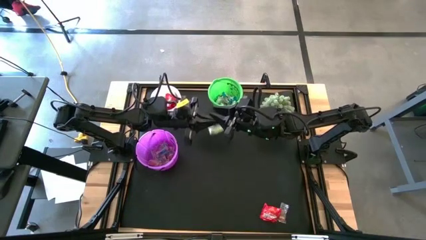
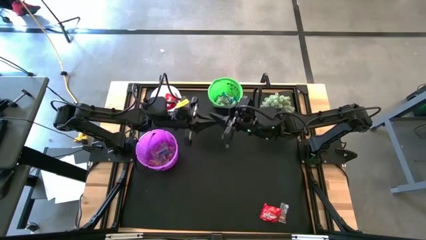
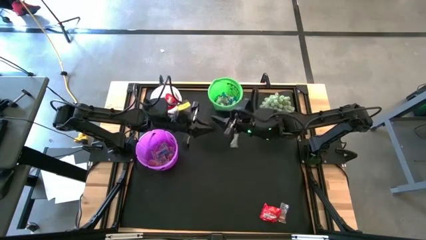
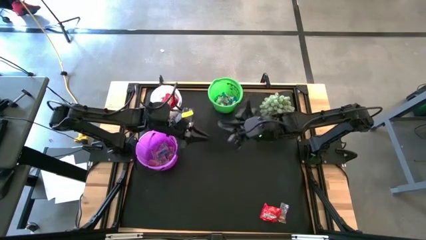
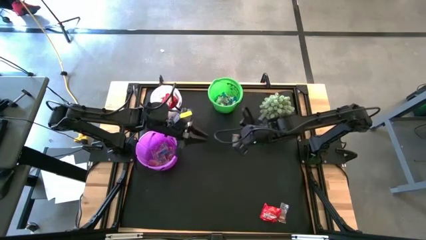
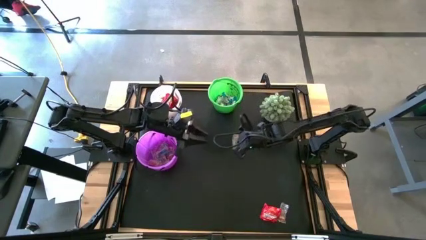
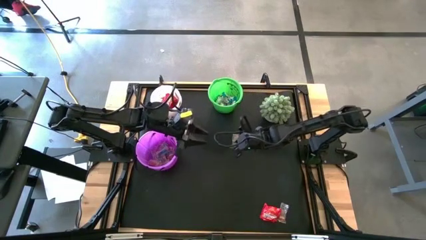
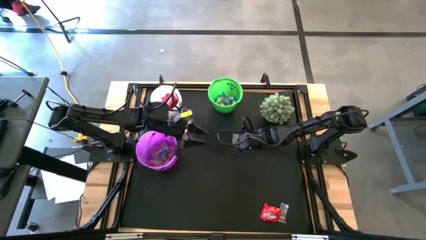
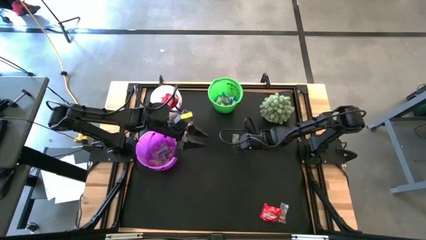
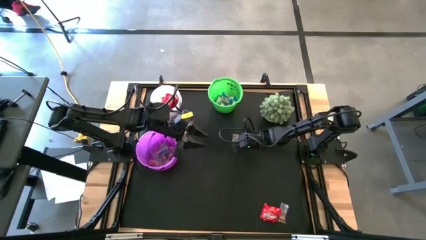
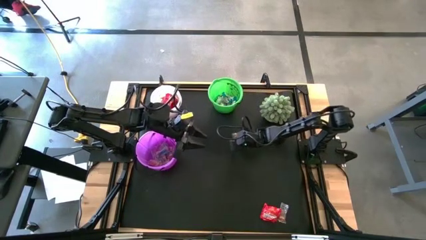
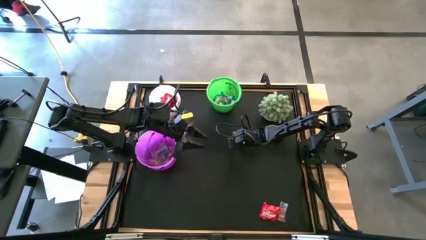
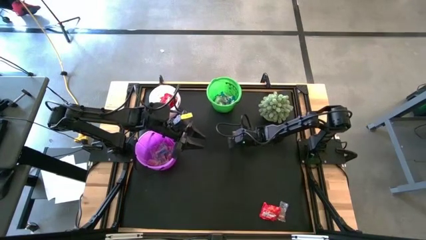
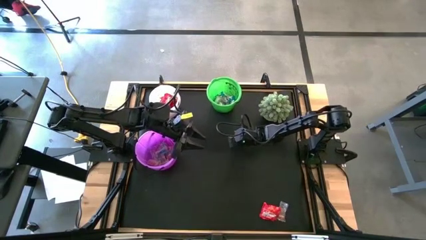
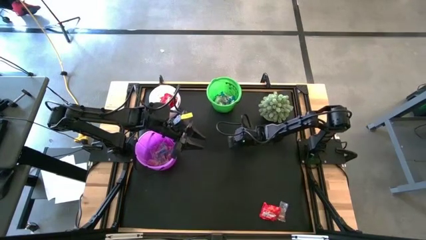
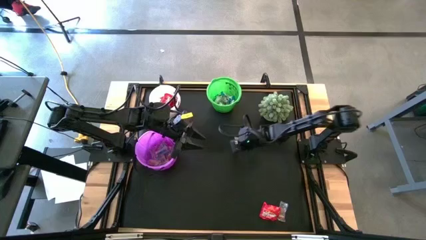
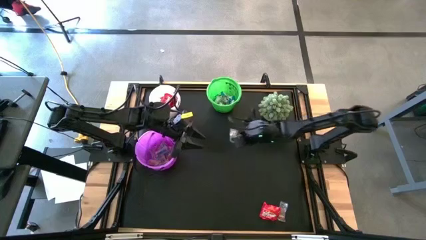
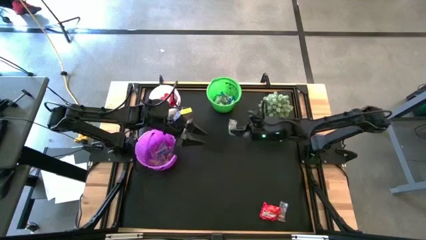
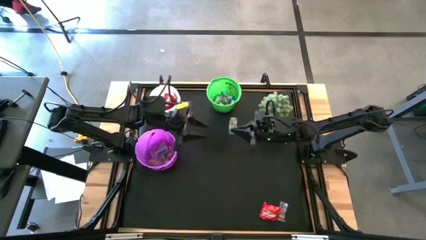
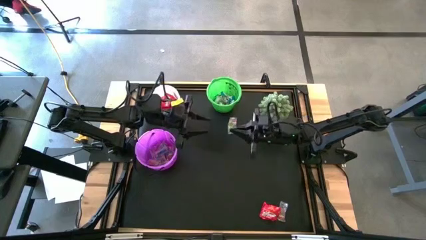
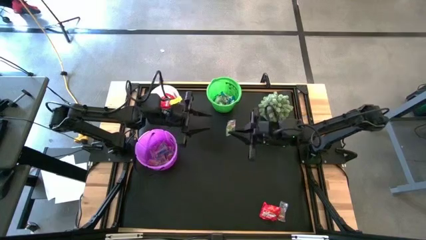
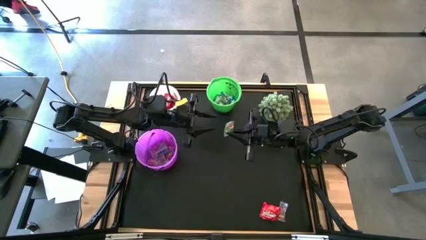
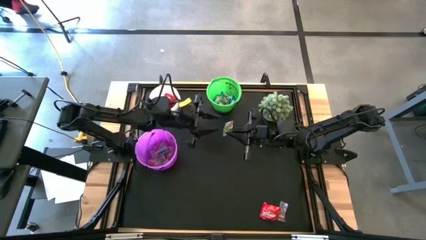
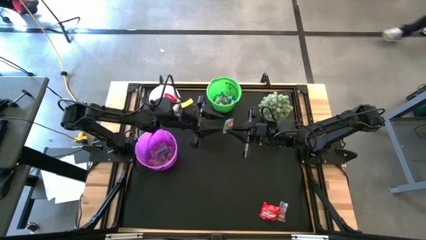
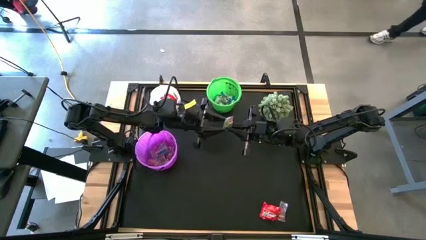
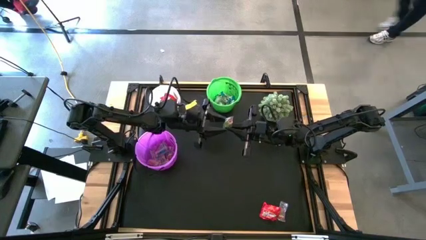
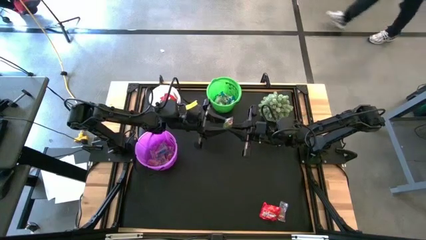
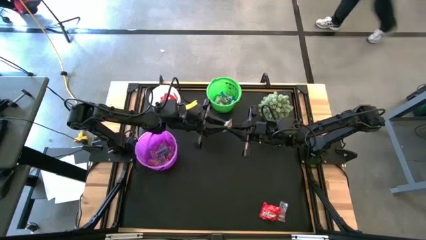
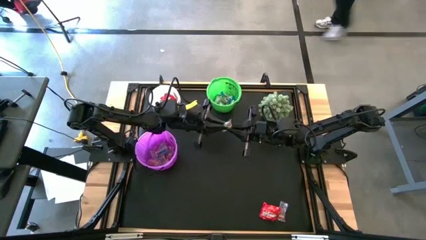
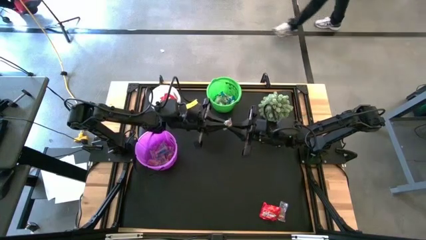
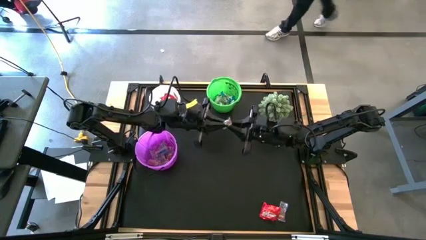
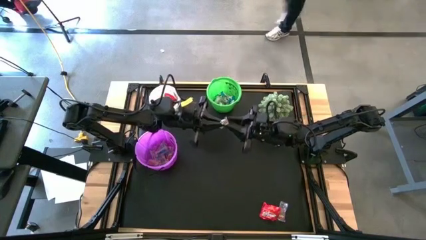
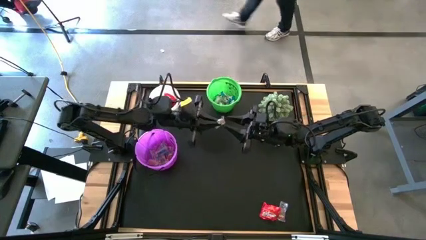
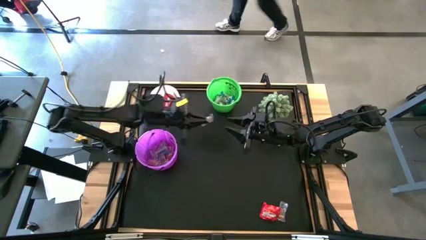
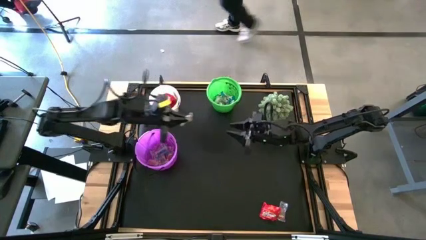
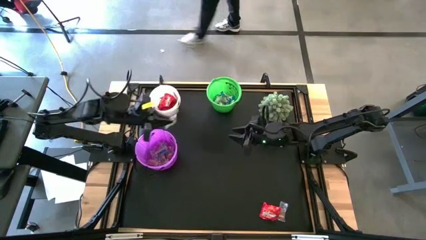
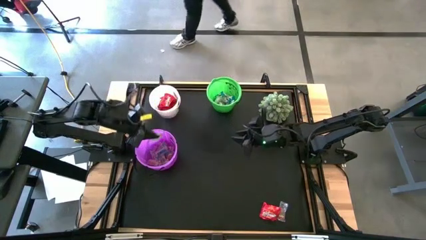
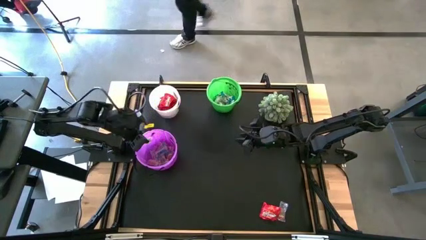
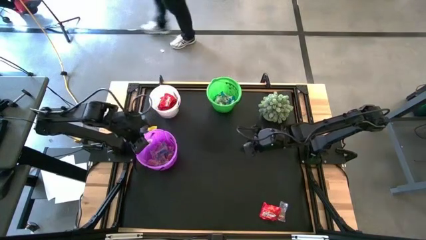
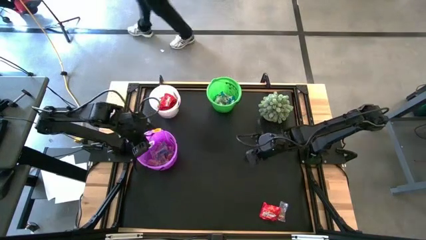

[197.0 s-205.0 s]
Task: Sort candy
Put the green gummy into the violet bucket

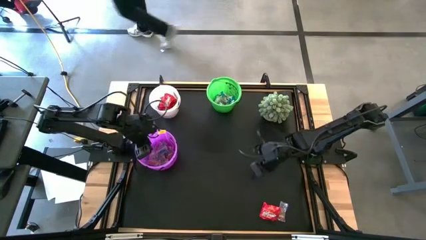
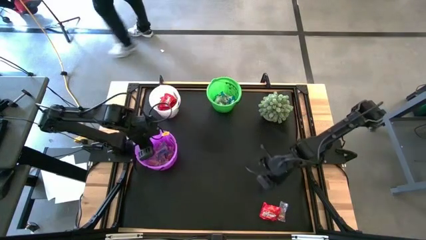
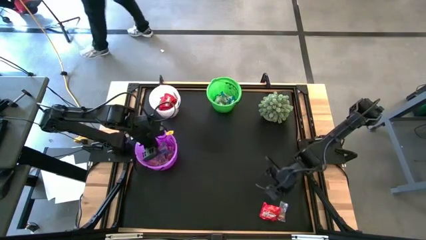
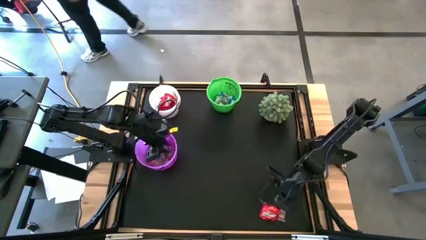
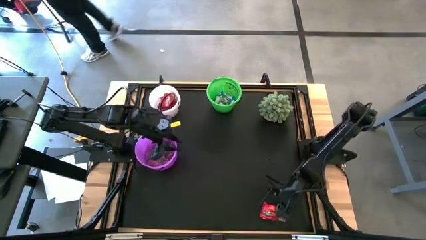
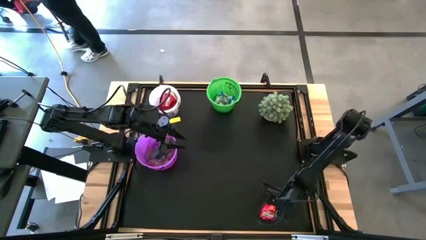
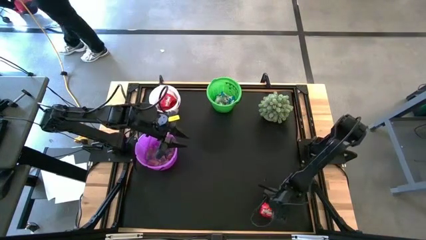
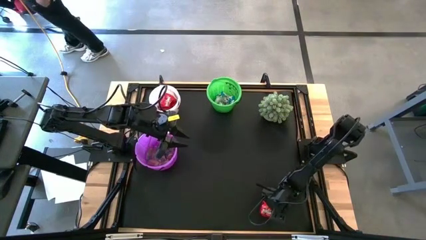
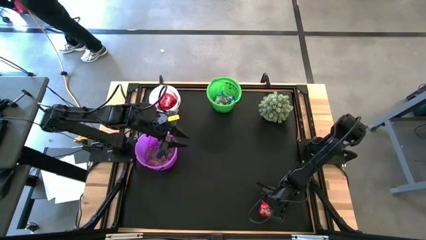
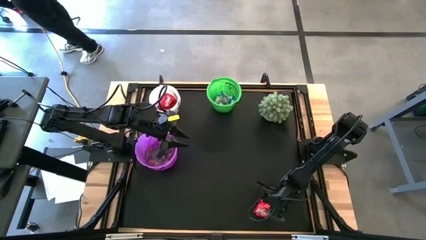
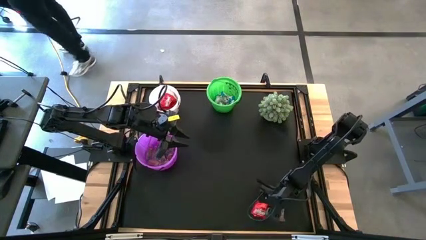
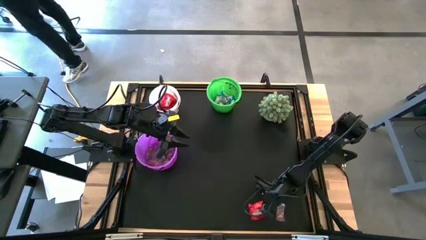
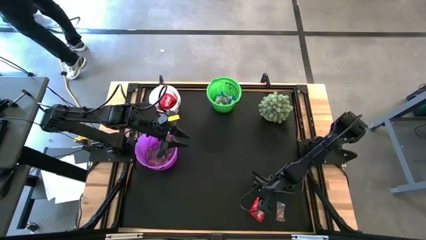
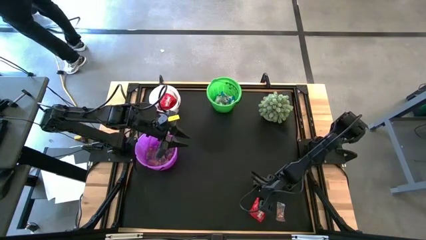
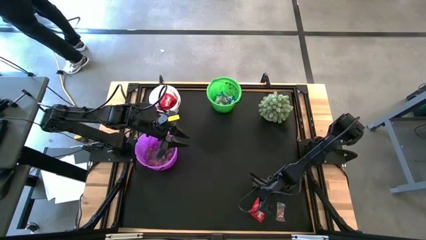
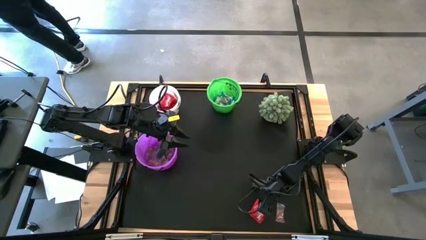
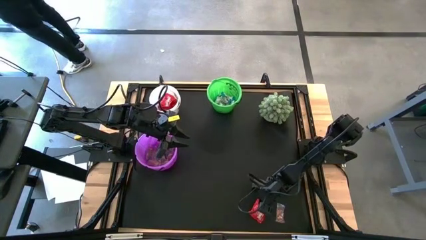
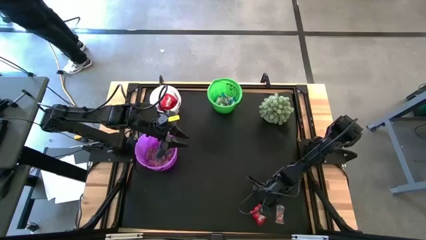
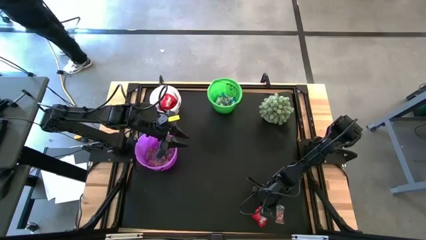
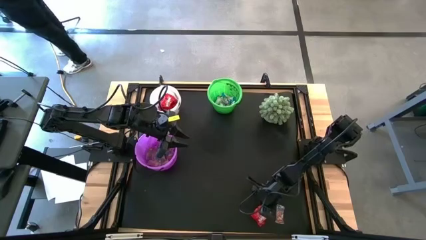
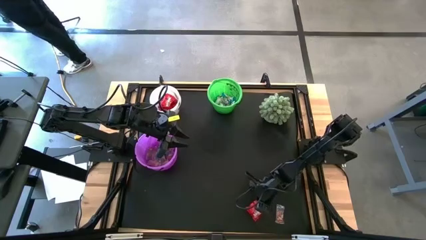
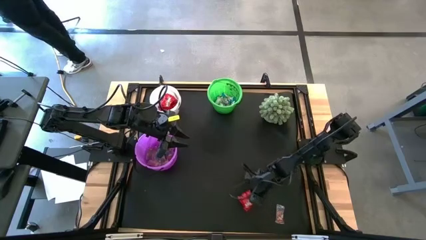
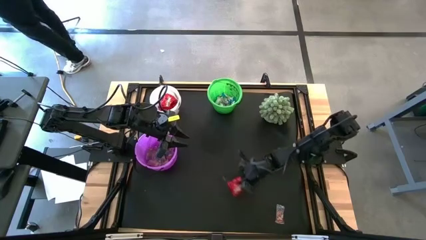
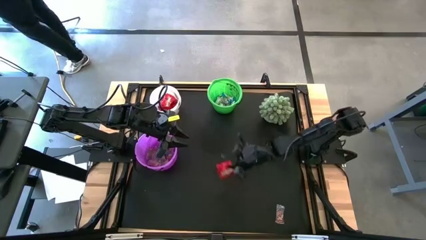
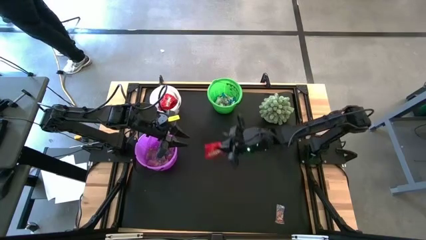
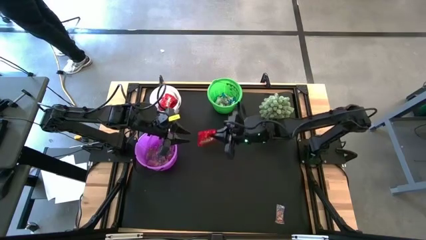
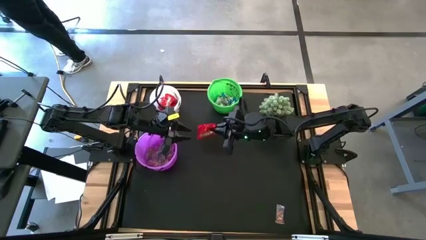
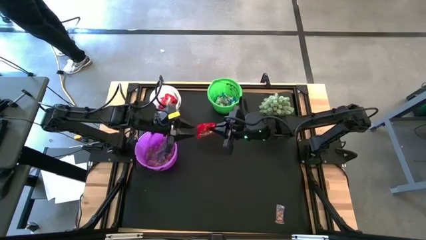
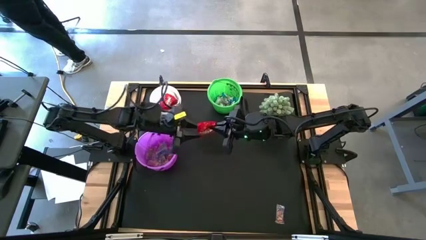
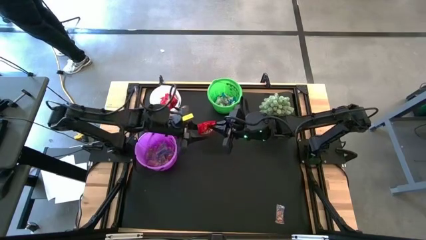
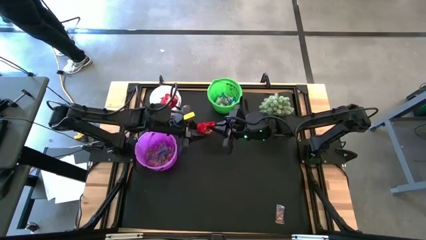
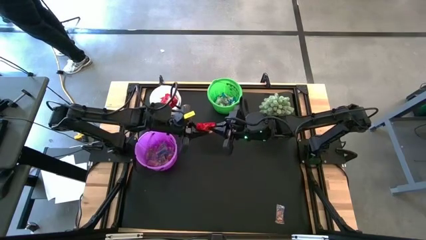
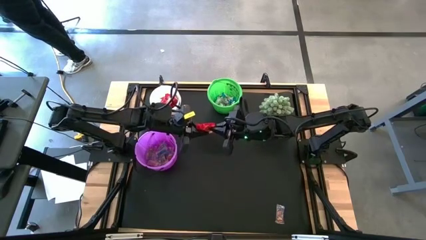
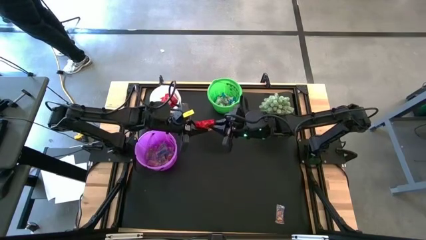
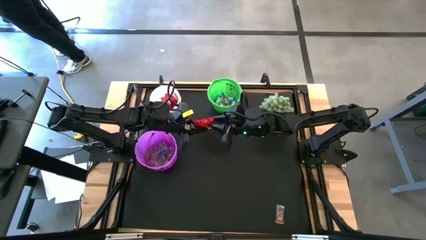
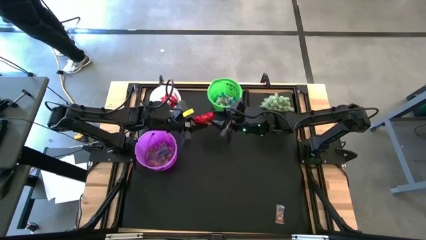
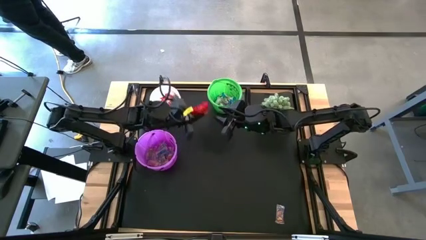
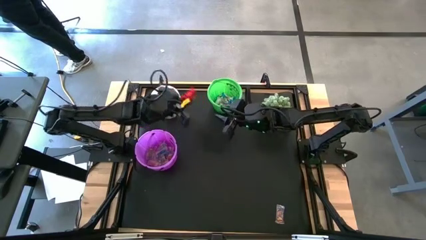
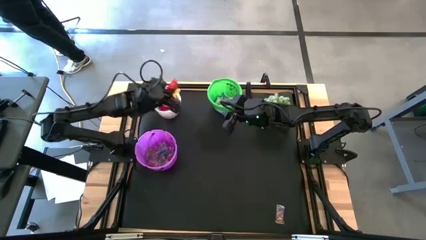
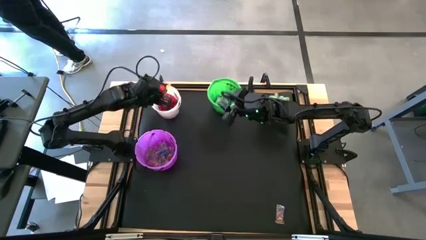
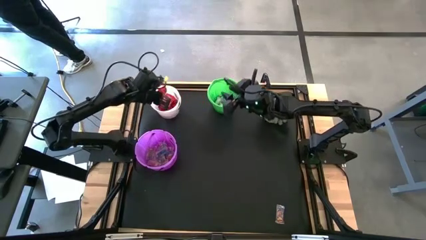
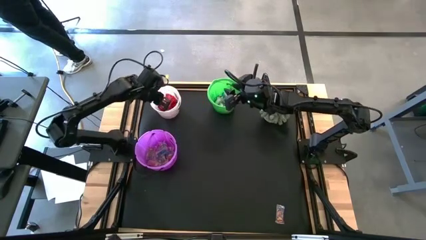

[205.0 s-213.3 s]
Put the red candy into the white bucket
